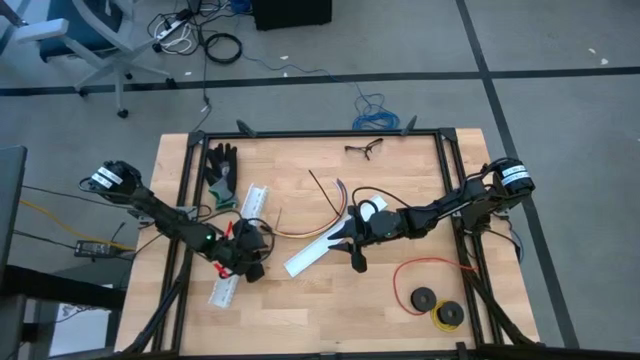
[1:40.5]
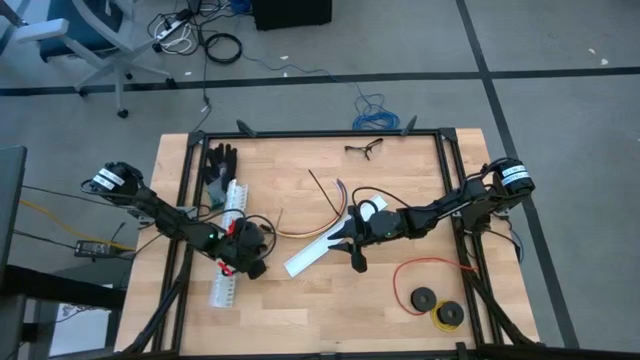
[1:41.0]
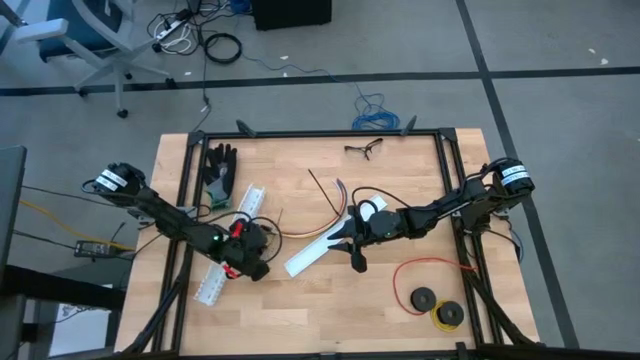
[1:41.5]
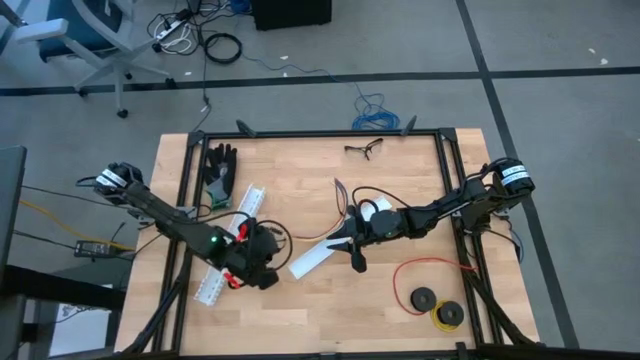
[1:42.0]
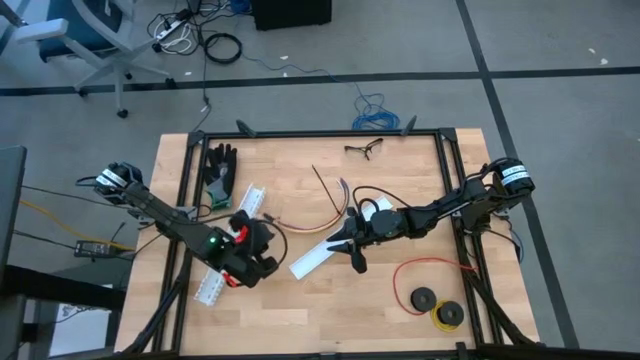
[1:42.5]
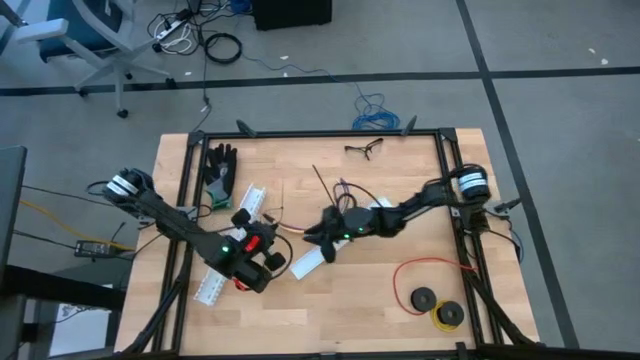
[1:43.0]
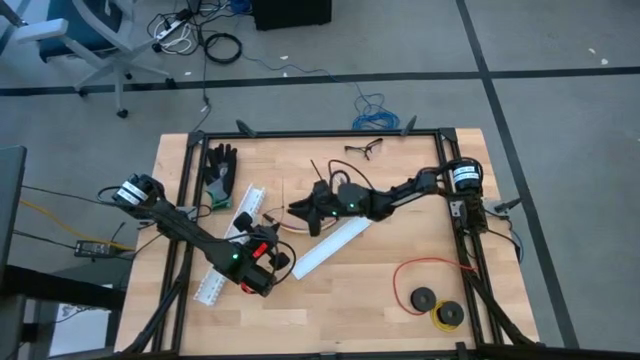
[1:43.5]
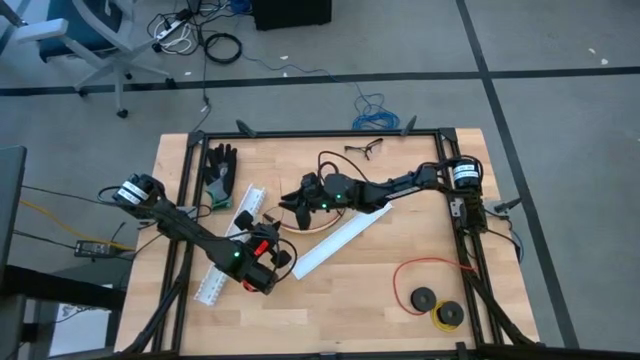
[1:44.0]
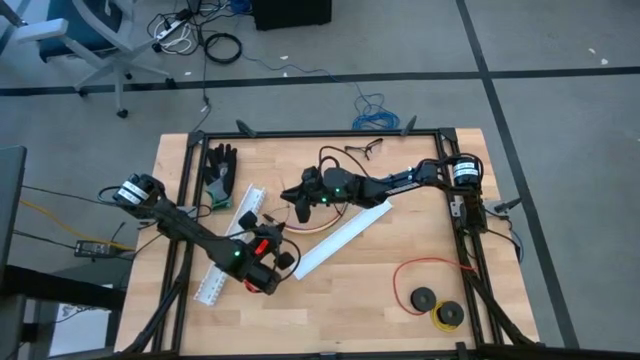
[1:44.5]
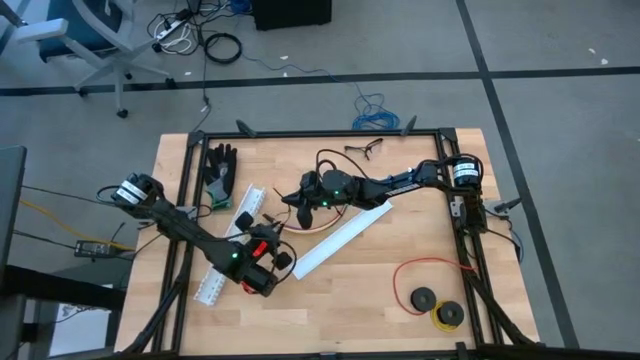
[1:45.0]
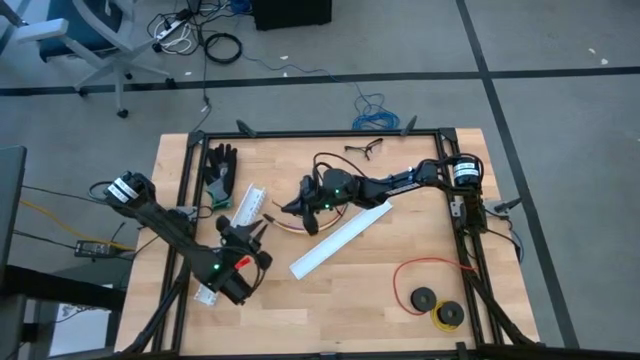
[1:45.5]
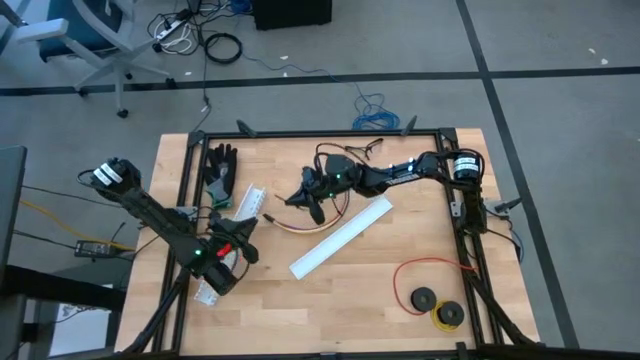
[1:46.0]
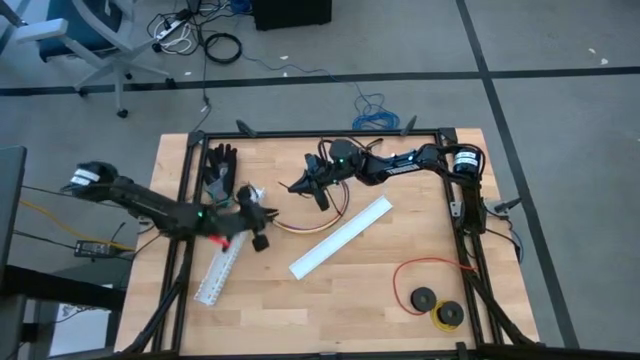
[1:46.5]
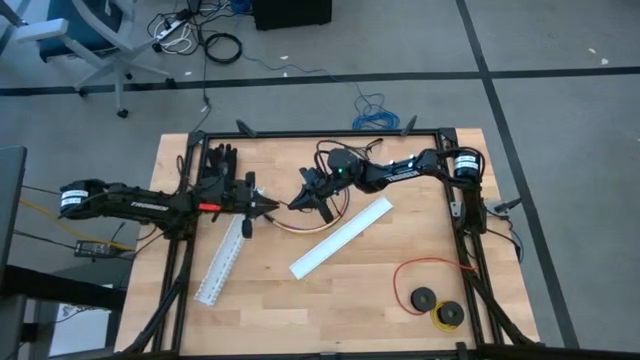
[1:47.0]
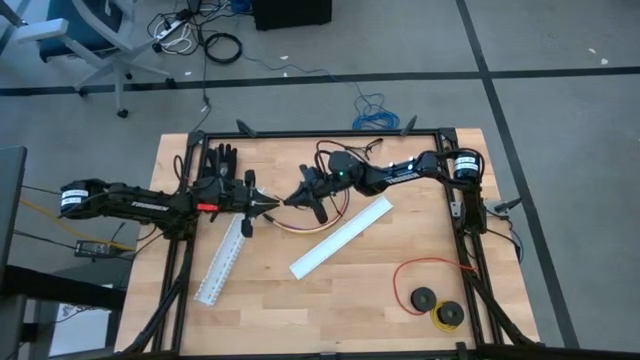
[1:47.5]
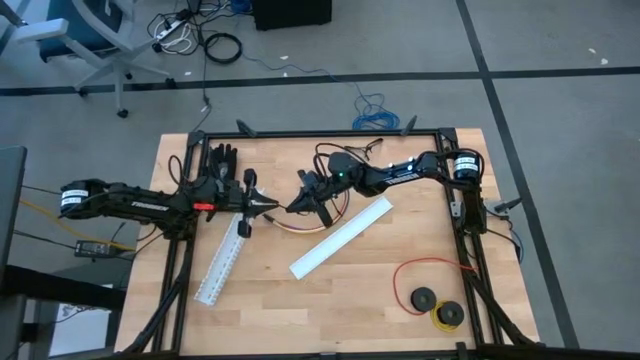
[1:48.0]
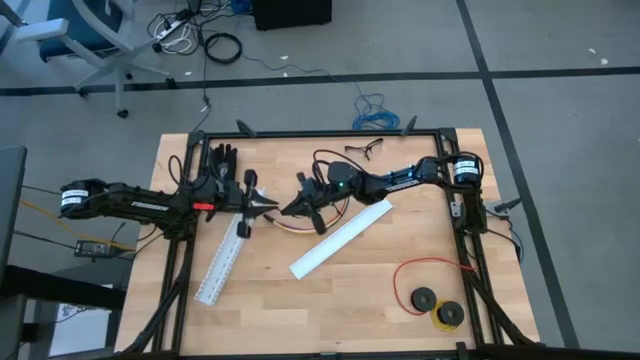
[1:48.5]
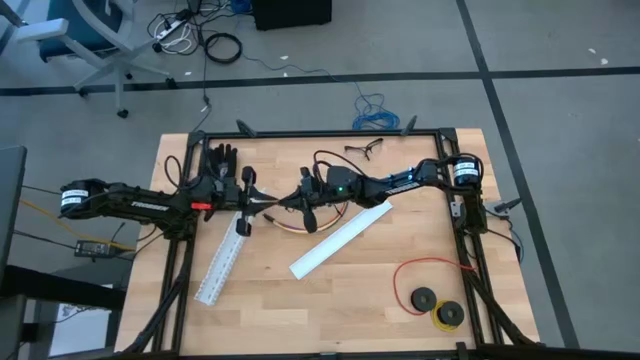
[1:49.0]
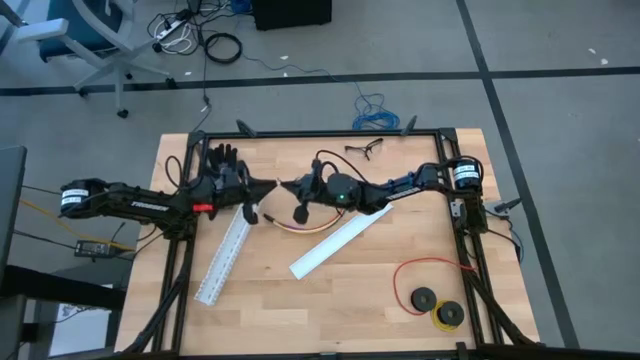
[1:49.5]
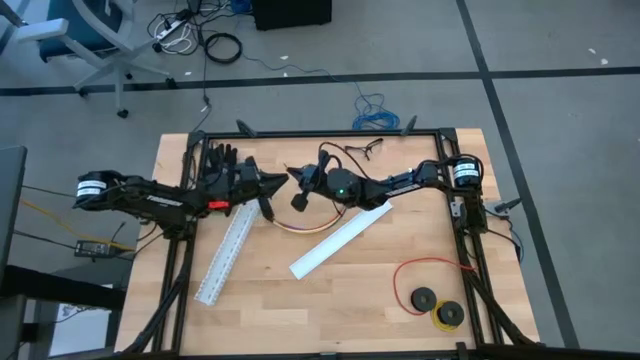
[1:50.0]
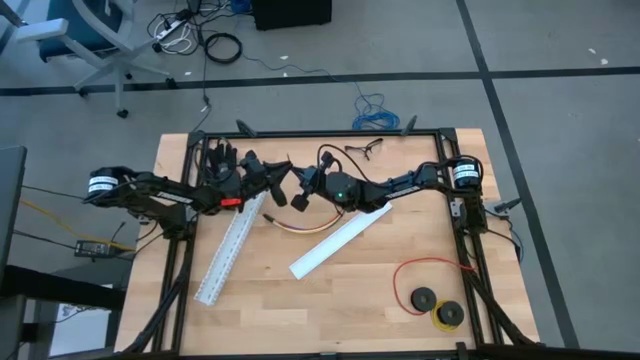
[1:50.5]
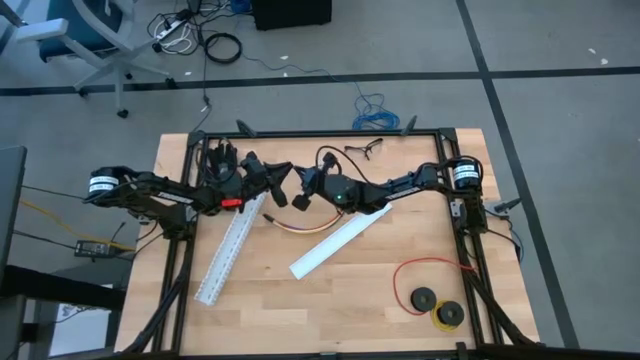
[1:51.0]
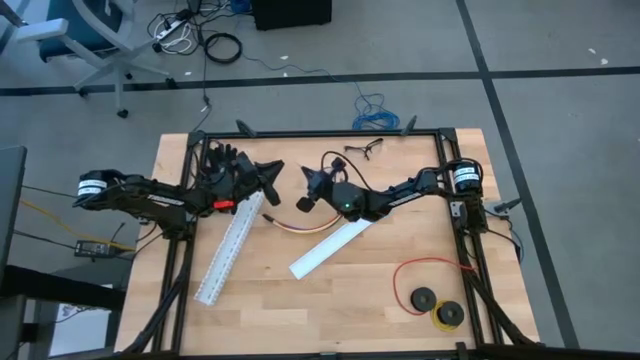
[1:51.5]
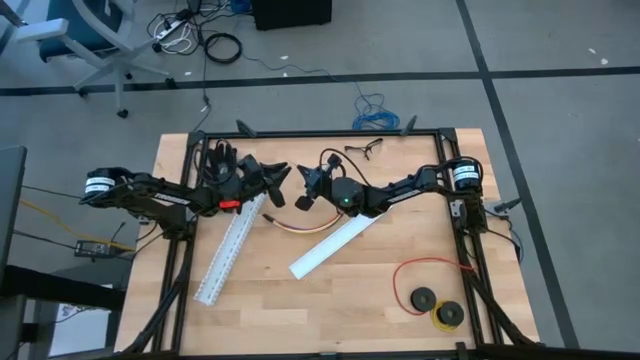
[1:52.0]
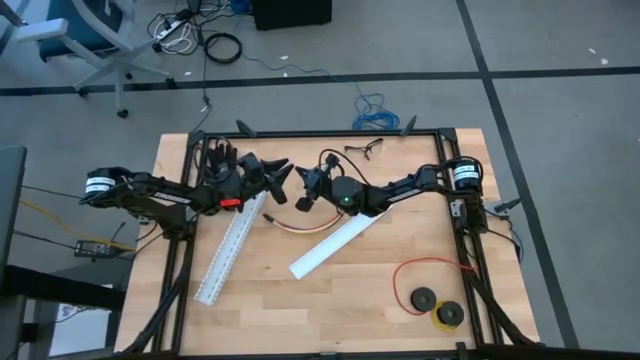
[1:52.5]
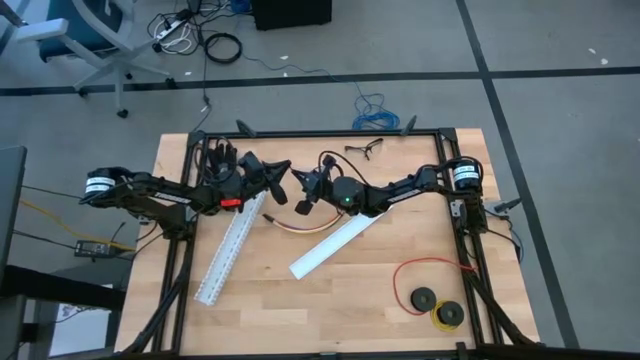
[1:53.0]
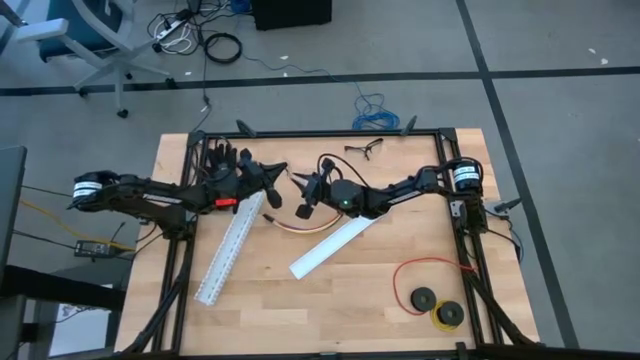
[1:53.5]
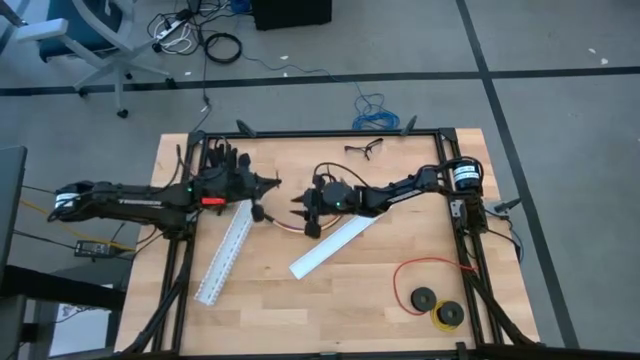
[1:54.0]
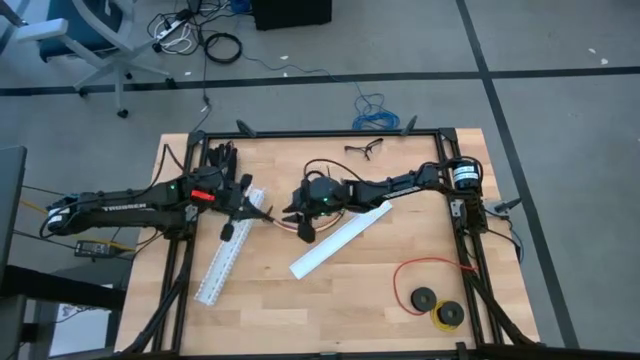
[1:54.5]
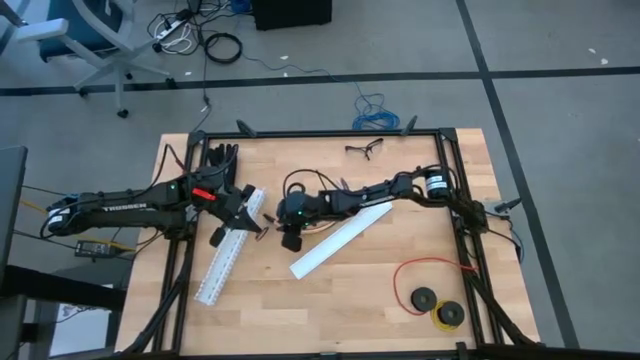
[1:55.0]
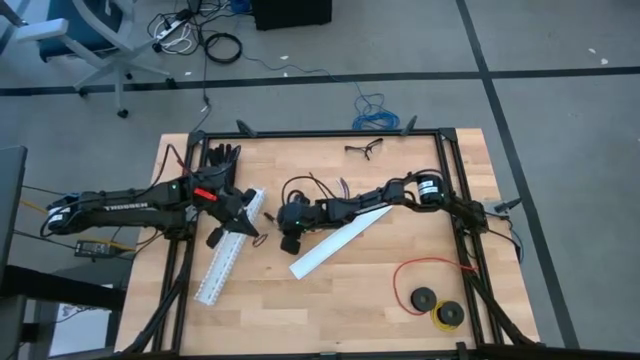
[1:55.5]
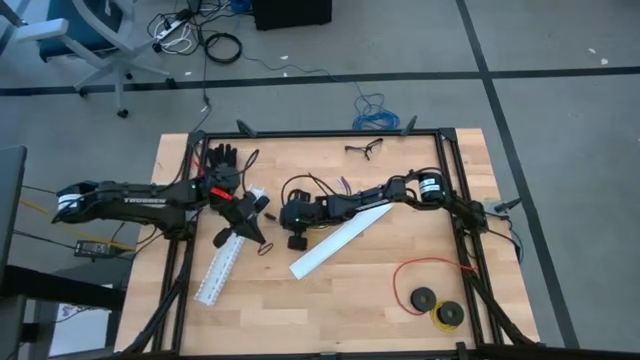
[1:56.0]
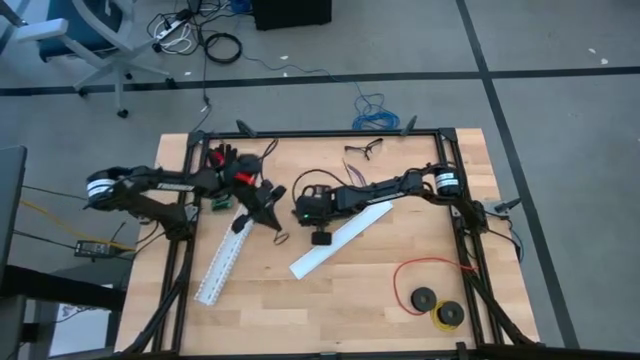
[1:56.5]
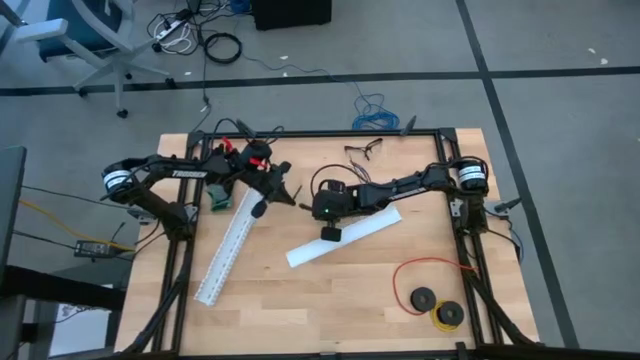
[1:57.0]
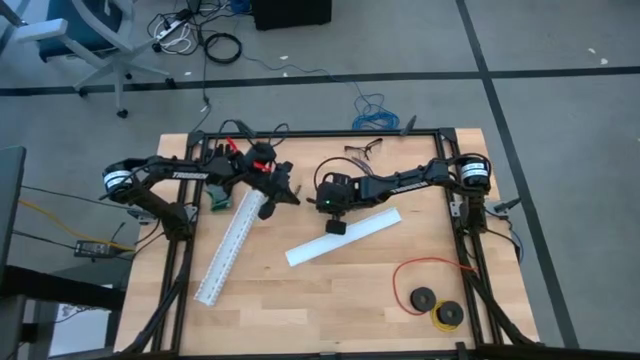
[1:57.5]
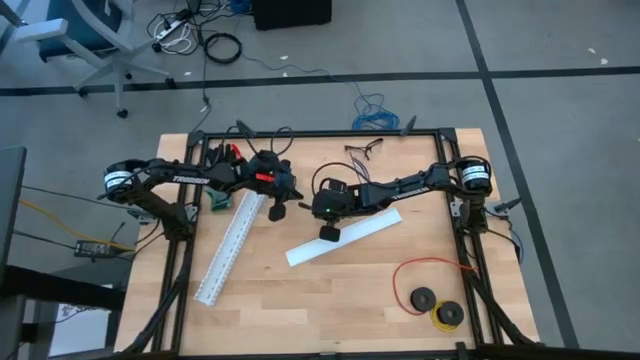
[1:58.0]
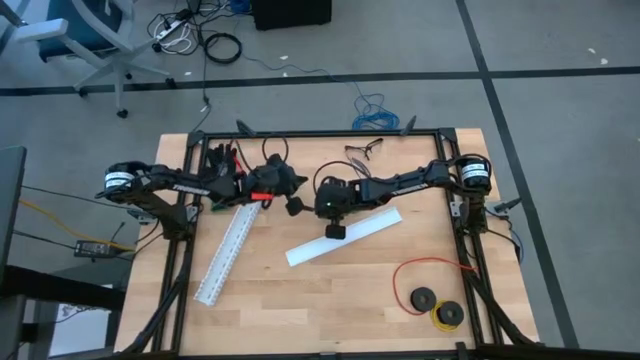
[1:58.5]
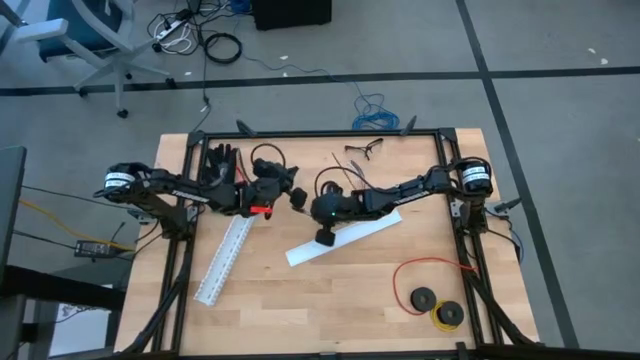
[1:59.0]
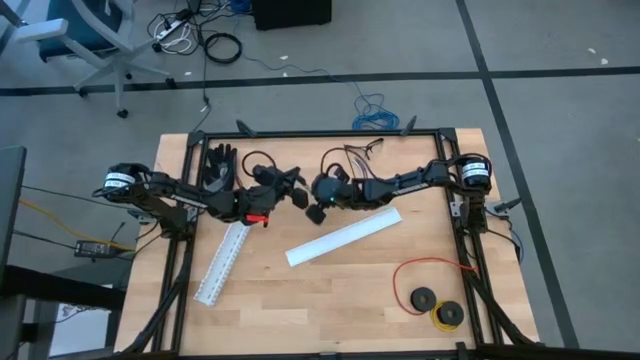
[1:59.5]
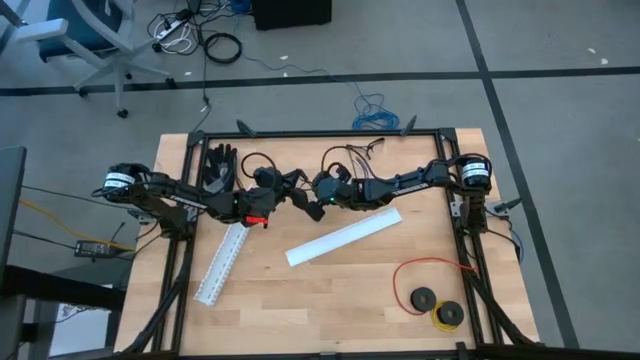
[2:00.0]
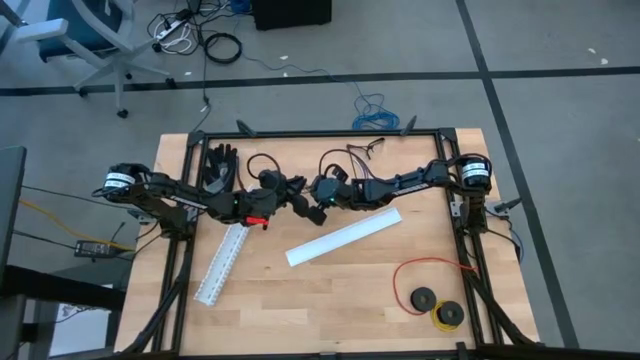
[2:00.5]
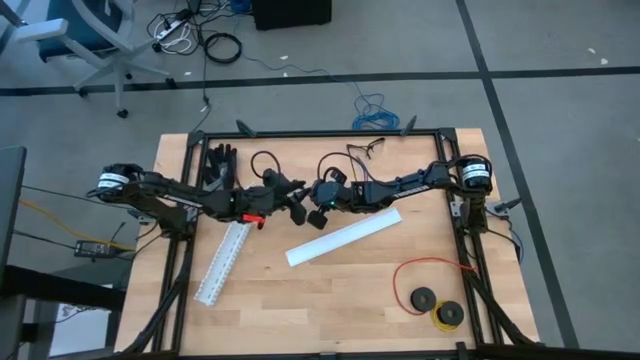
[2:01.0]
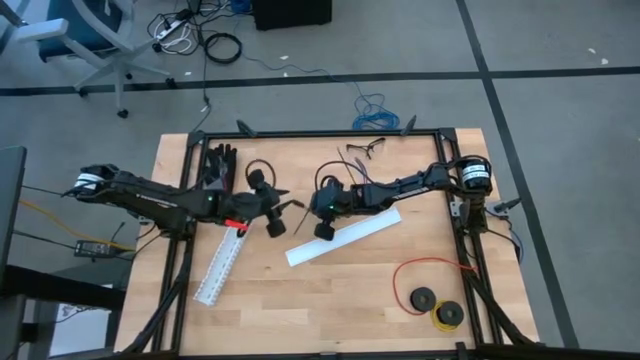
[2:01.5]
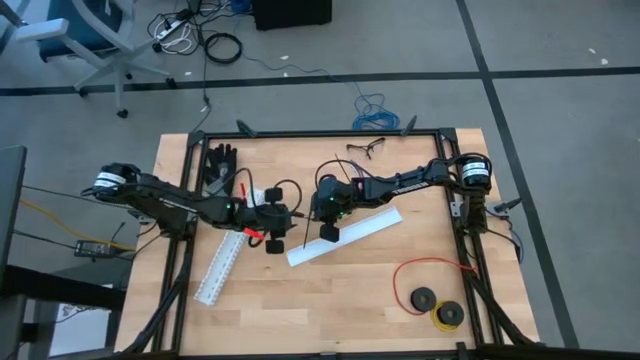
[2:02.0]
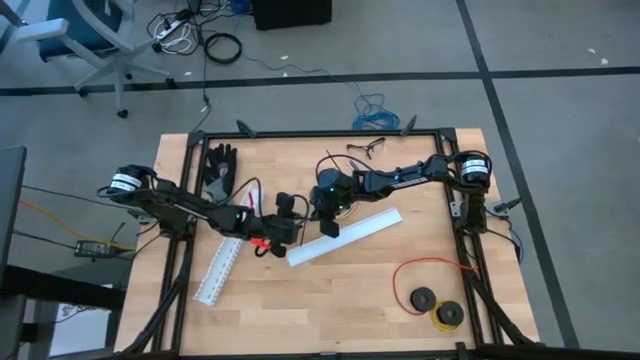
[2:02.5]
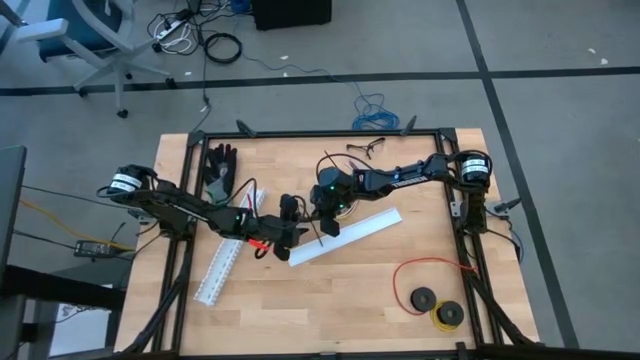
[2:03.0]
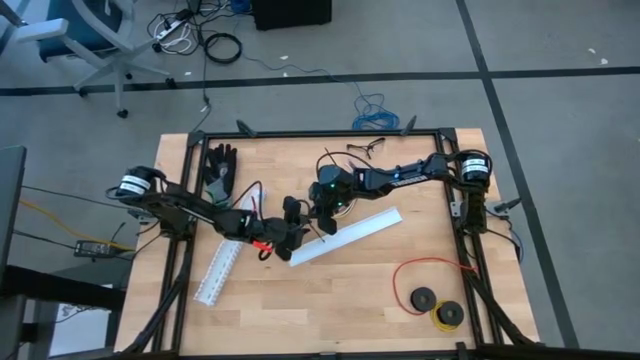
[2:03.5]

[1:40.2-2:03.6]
Task: Ziptie cables
Wrap the cables together using a zip tie
